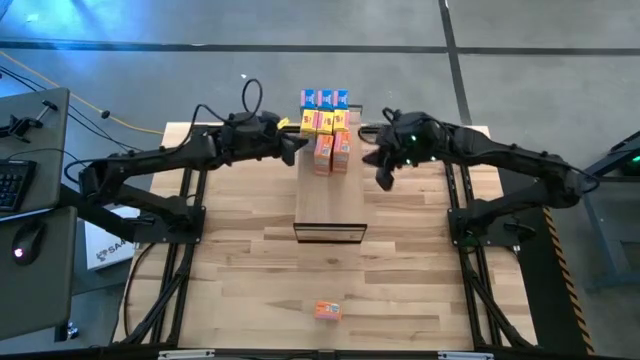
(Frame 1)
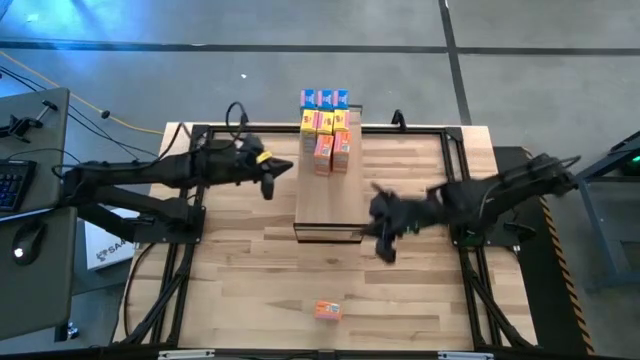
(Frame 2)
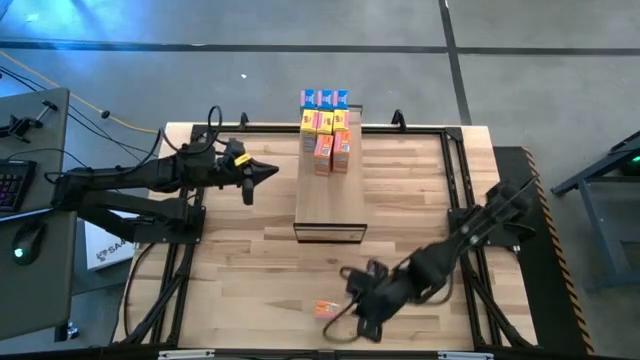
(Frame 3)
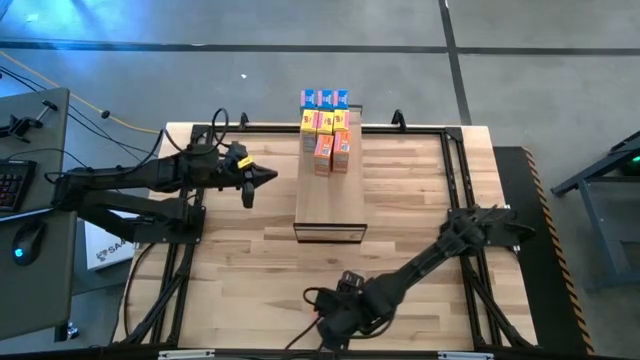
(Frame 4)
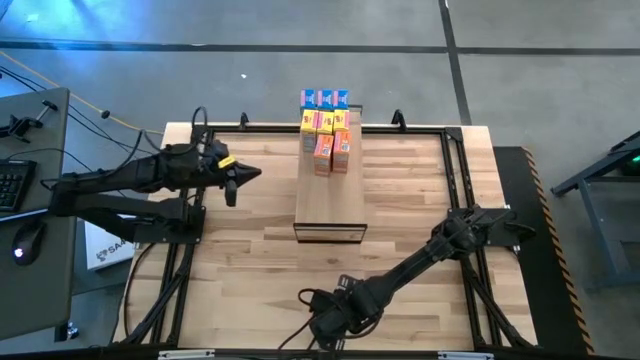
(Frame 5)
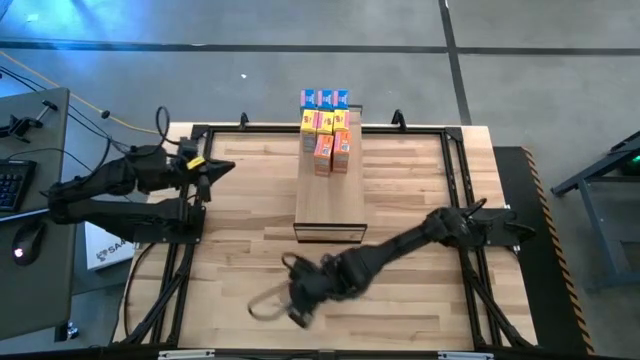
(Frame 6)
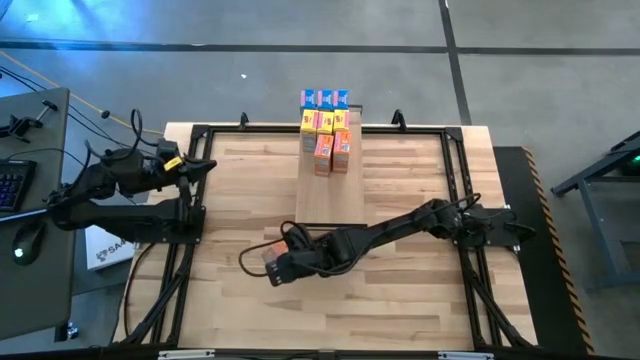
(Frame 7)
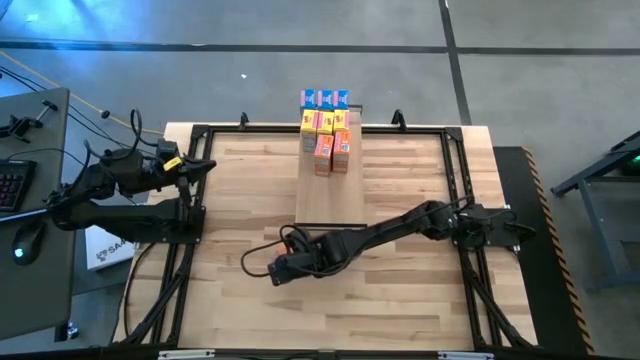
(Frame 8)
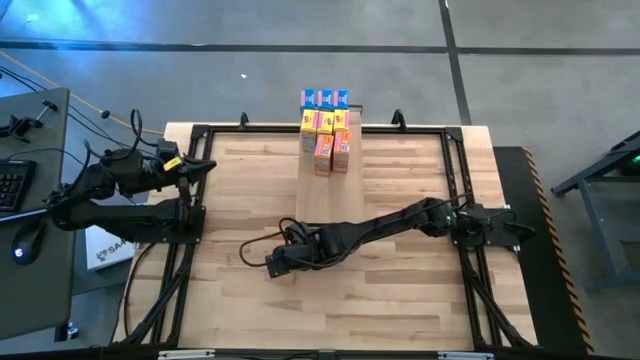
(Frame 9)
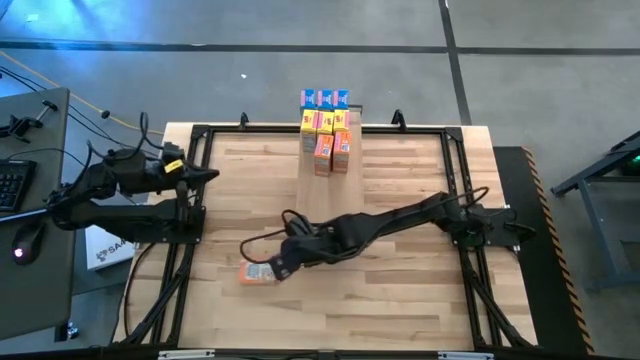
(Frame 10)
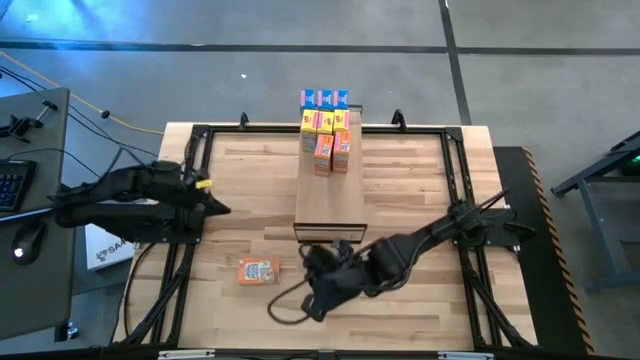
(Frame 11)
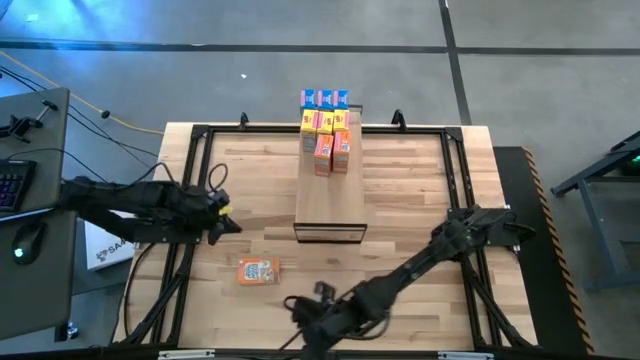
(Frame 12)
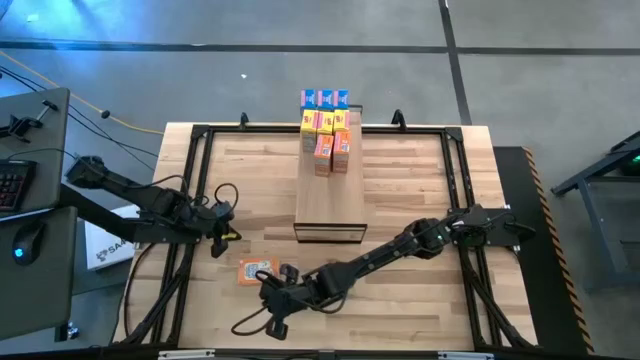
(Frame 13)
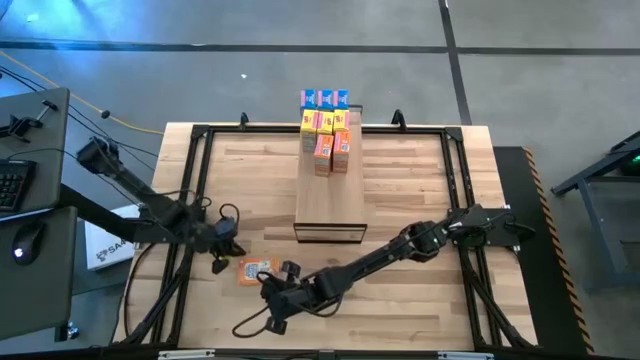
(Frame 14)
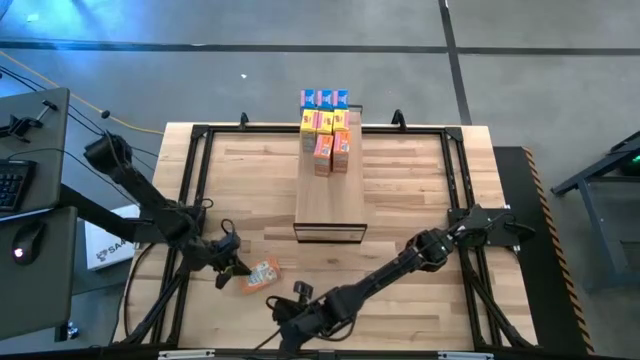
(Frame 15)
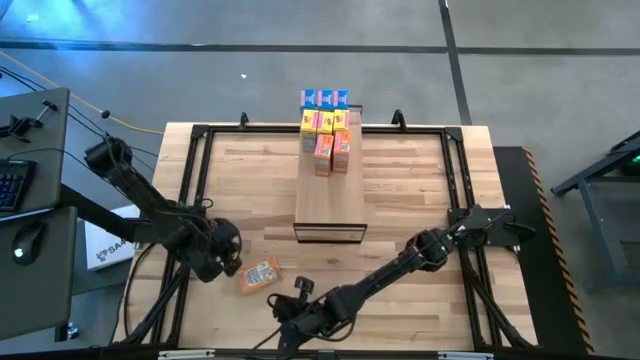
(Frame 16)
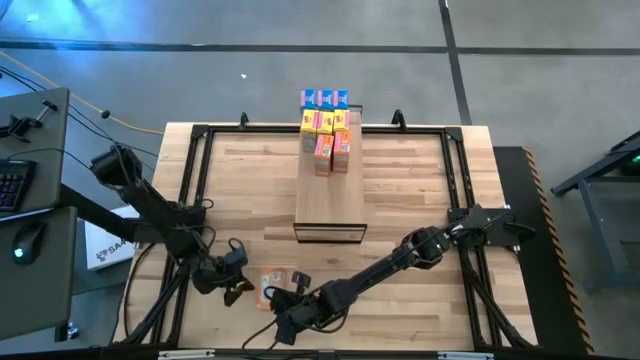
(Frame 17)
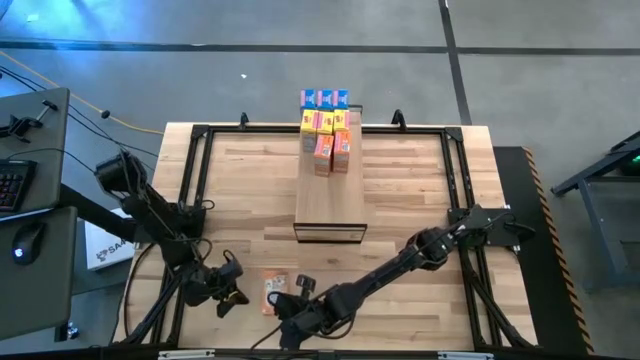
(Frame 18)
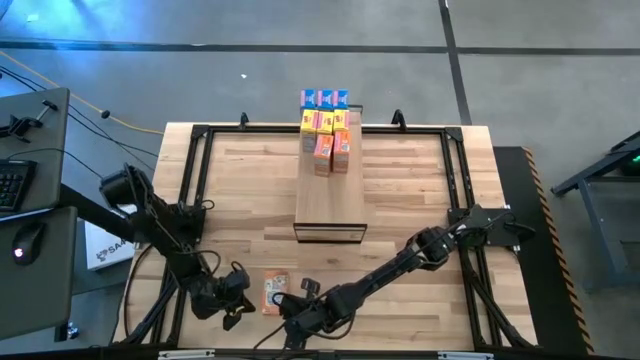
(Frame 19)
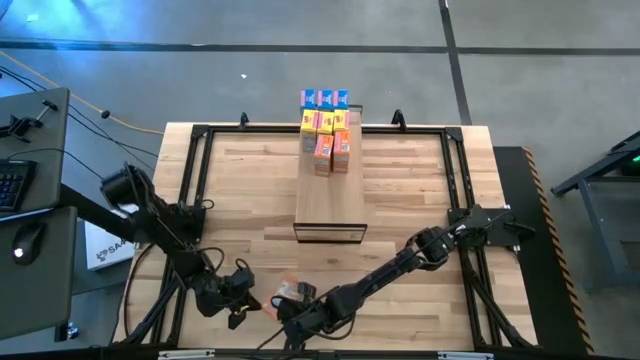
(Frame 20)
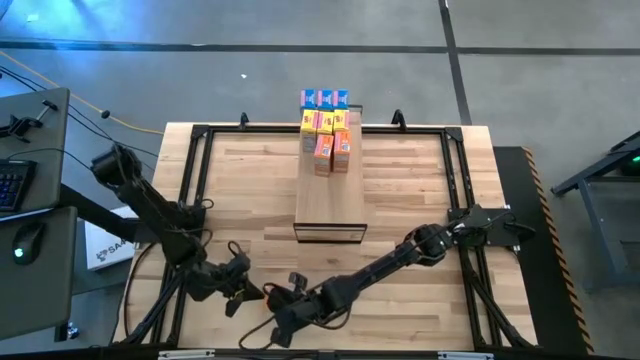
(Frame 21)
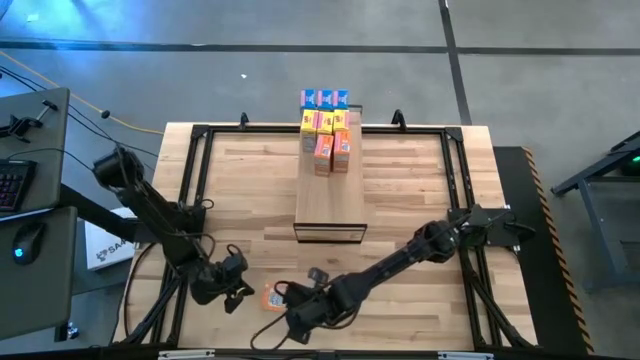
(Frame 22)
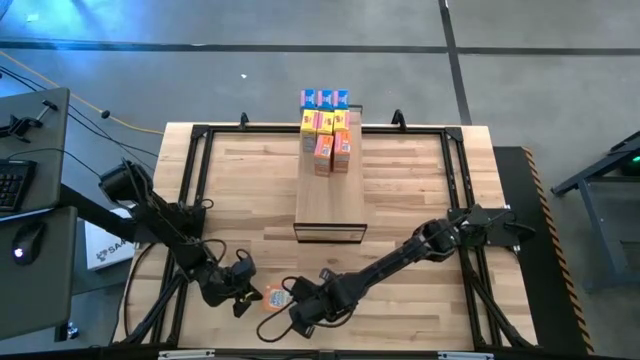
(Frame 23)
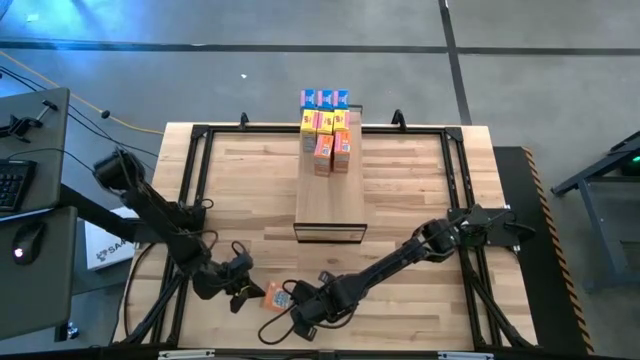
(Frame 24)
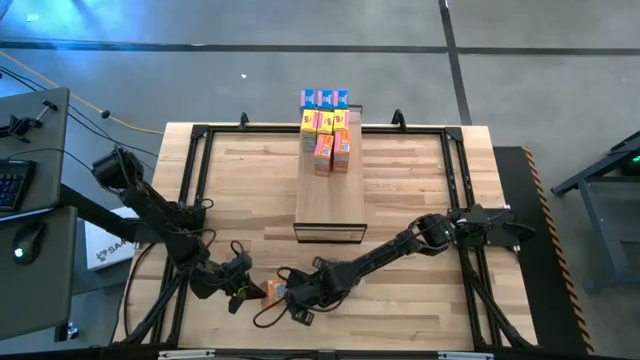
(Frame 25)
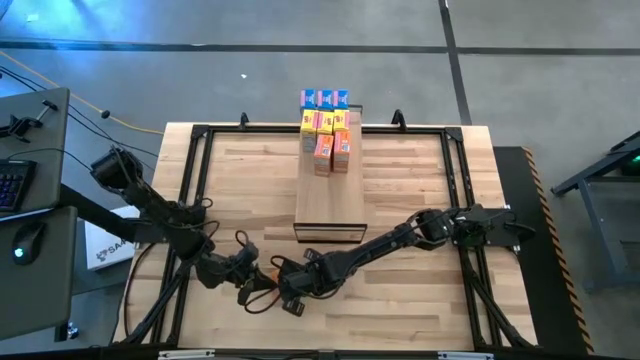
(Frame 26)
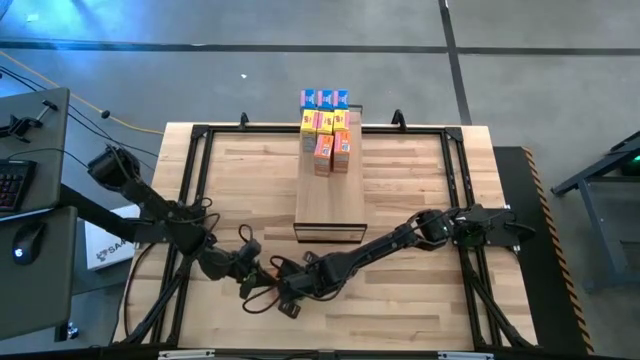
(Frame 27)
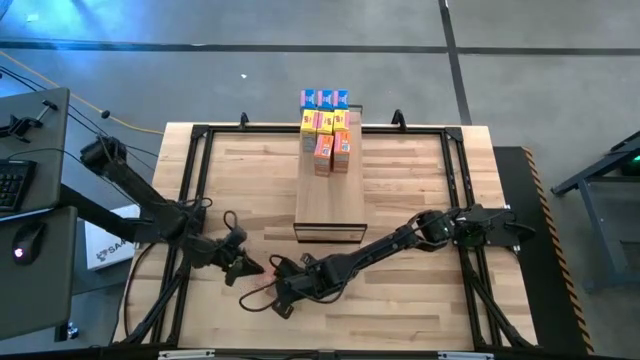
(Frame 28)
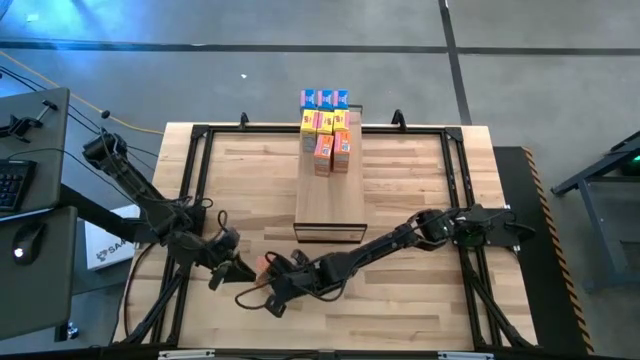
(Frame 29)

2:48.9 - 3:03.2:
Task: Stack cereal on shelf
Put the orange cereal box on the shelf aligned with the orange cereal boxes

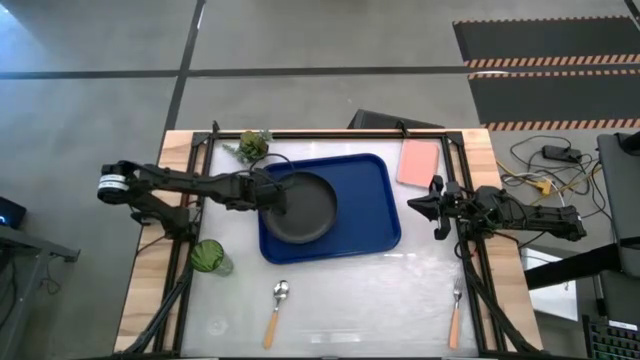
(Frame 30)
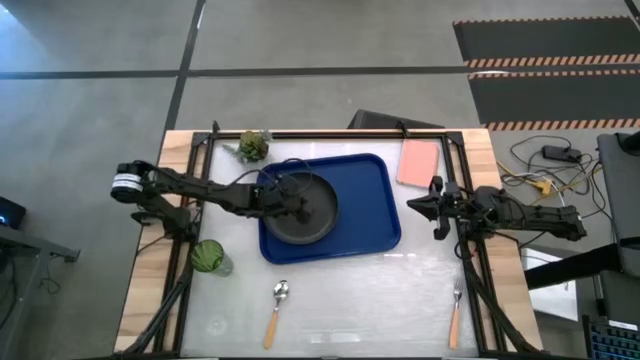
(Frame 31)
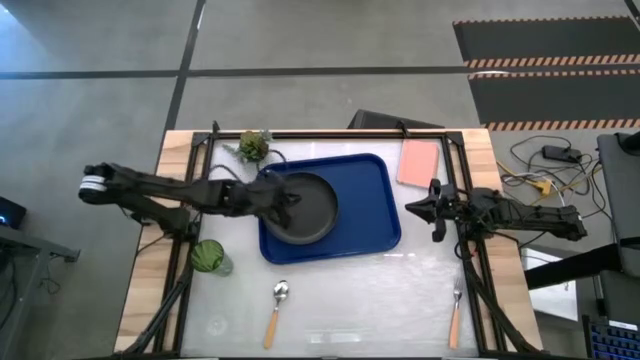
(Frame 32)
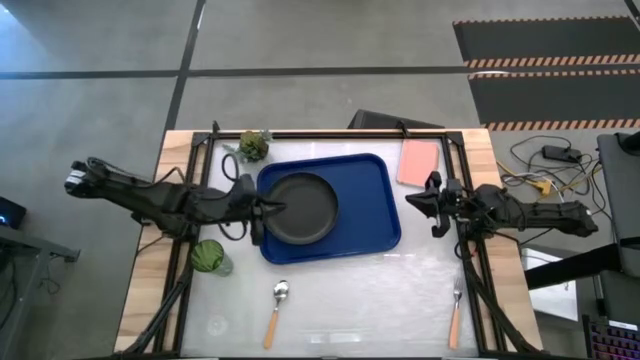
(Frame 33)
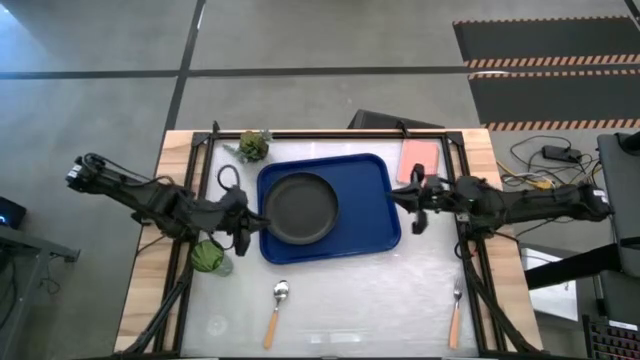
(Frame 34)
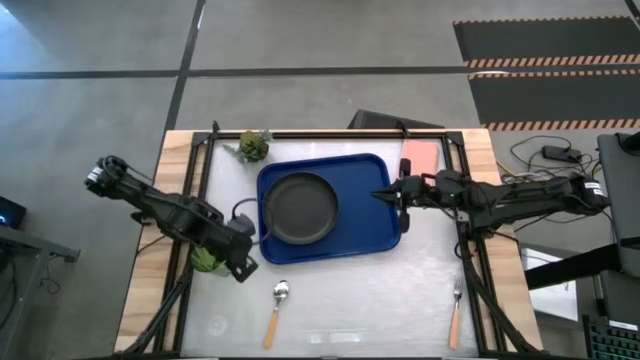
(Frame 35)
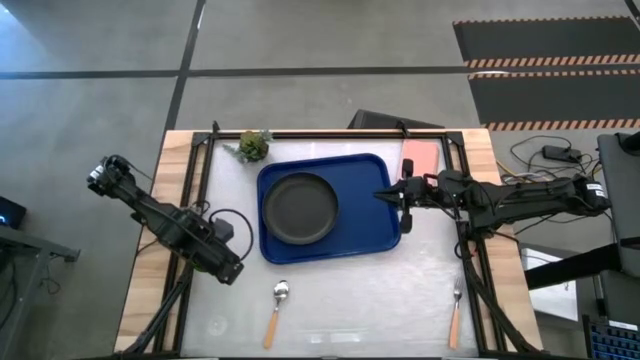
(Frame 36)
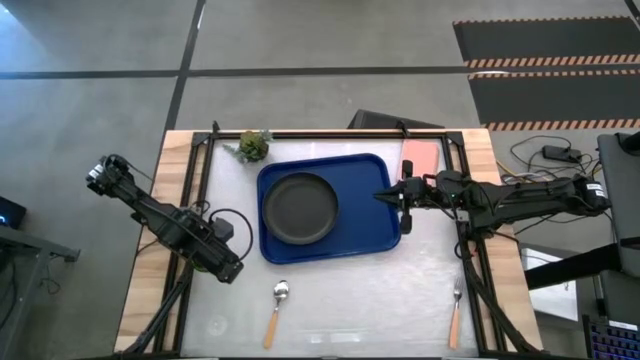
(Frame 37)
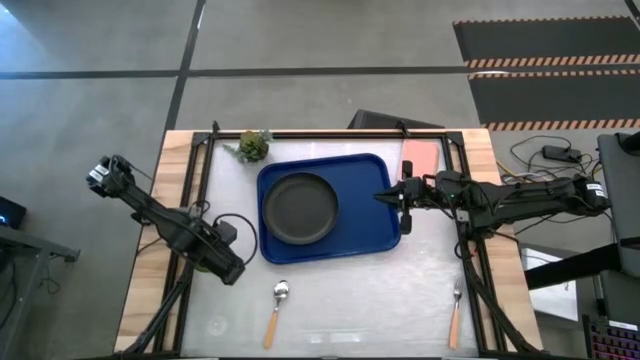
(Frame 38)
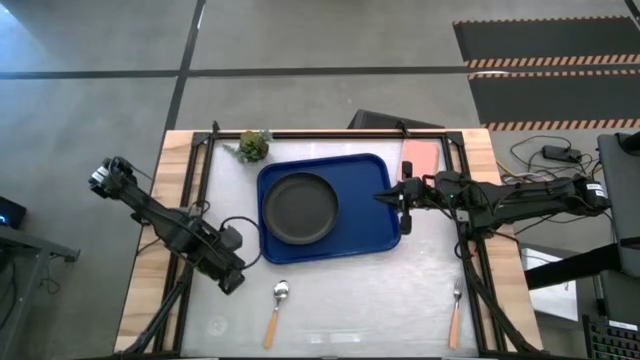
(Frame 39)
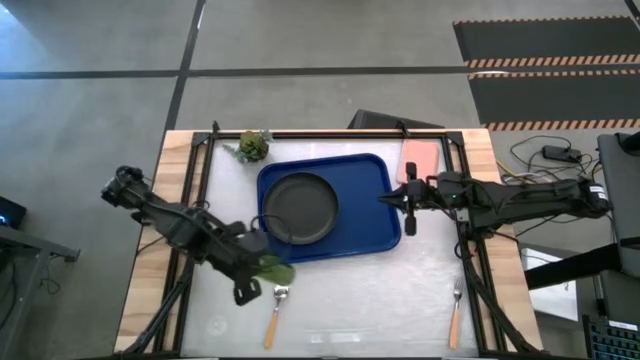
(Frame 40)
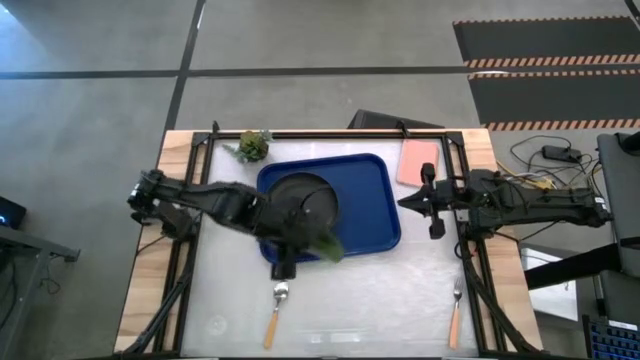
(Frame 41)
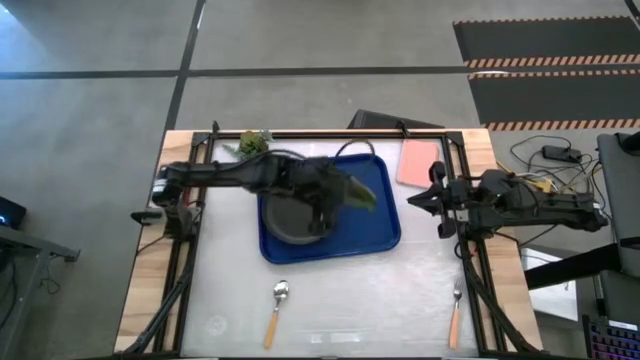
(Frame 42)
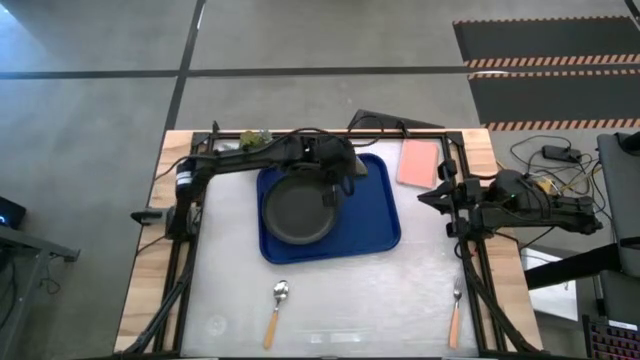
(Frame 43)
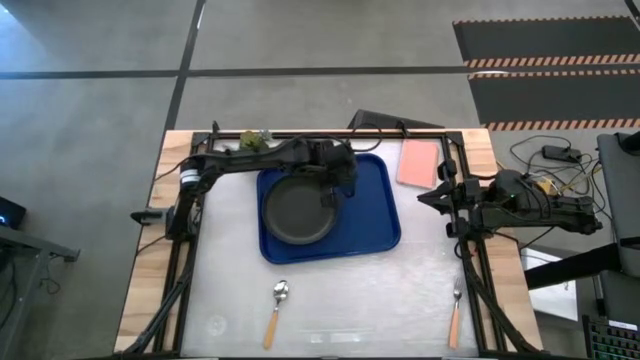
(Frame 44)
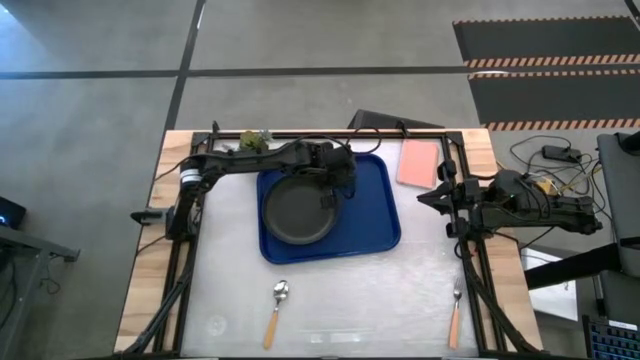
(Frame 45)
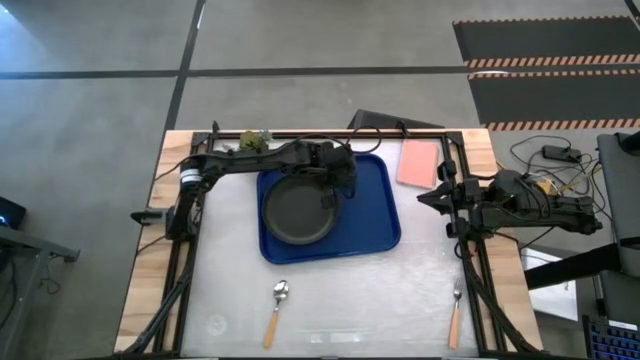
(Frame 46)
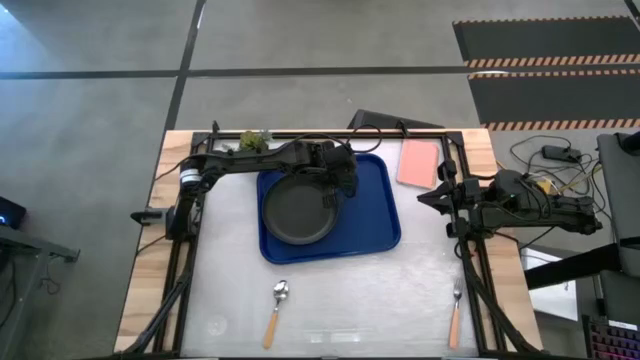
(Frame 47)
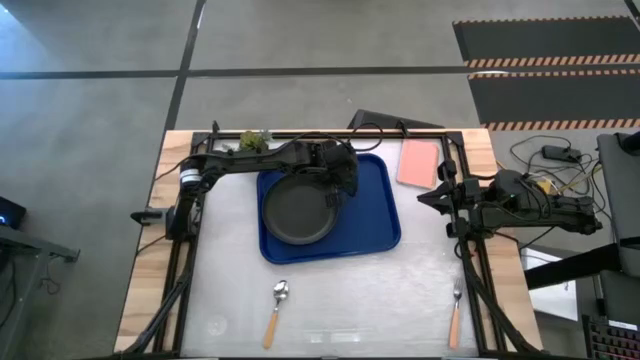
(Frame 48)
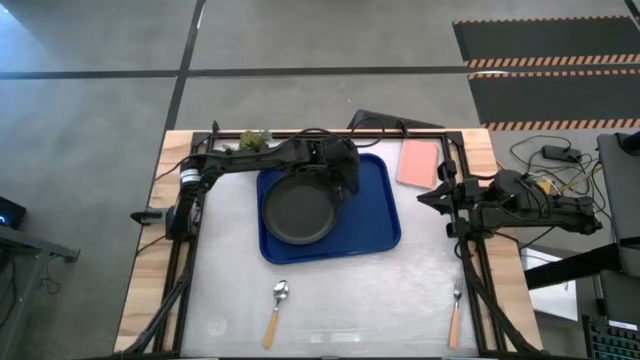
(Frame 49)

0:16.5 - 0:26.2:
Task: Pick and place plate/cup/fork/spoon on tray
Put the green cup on the blue tray to the top right of the black plate
